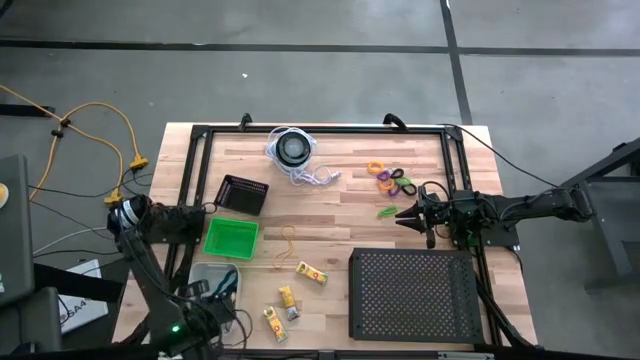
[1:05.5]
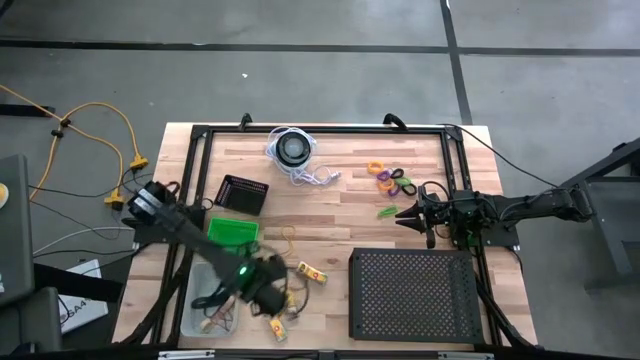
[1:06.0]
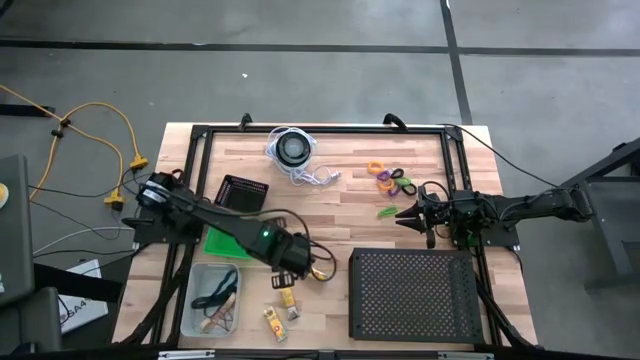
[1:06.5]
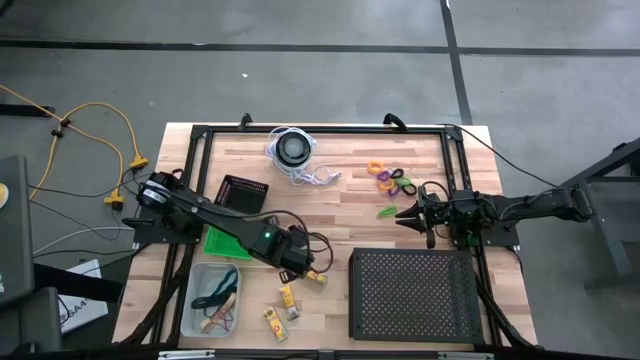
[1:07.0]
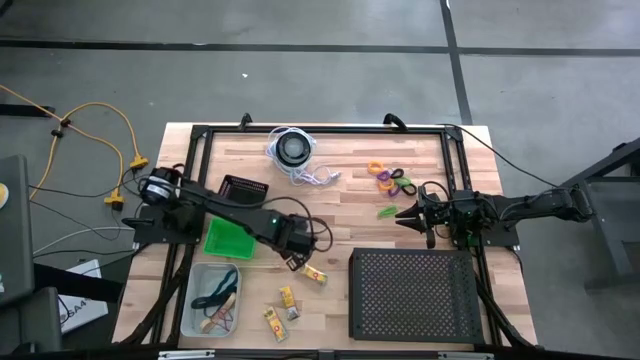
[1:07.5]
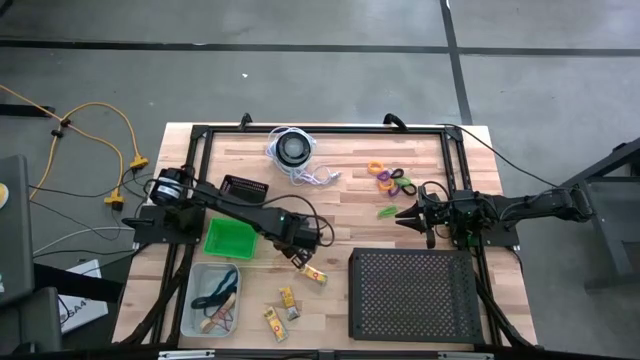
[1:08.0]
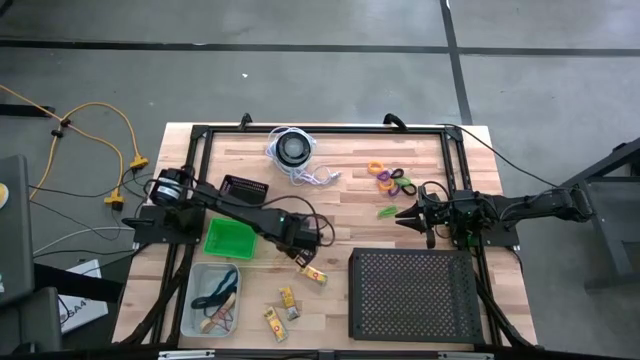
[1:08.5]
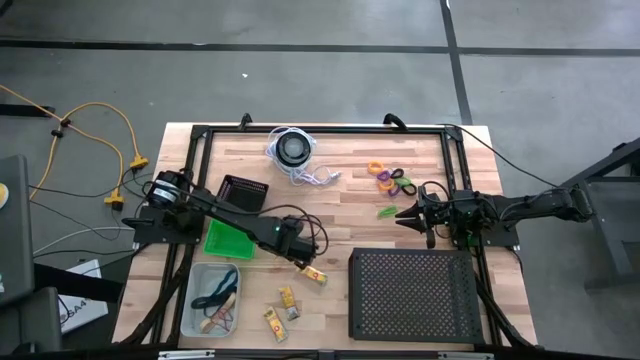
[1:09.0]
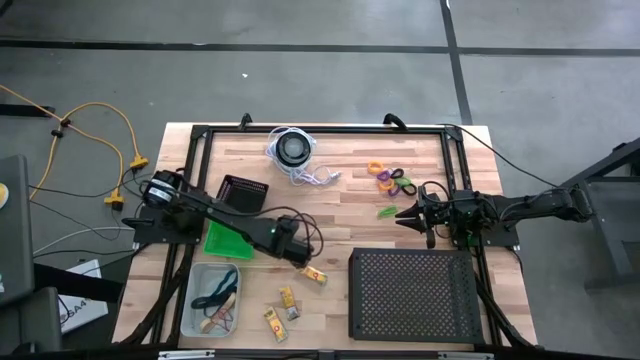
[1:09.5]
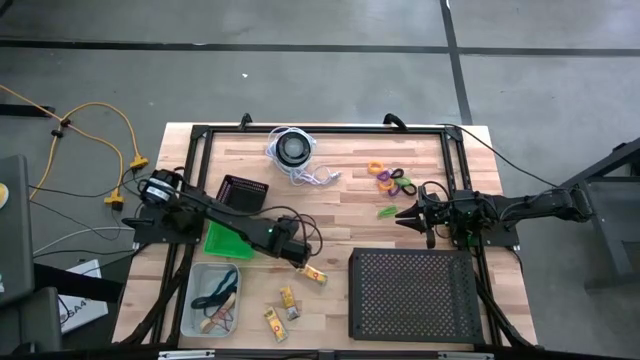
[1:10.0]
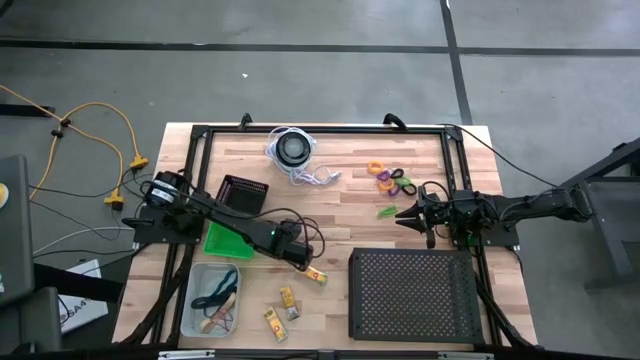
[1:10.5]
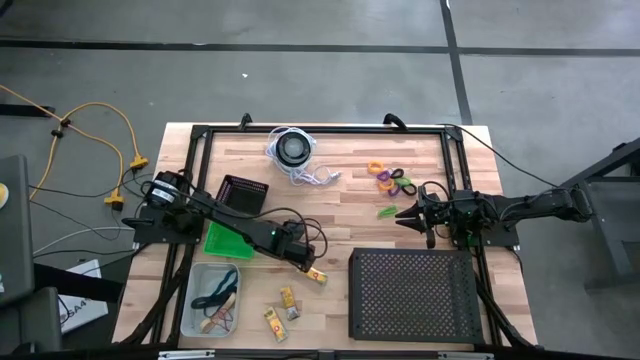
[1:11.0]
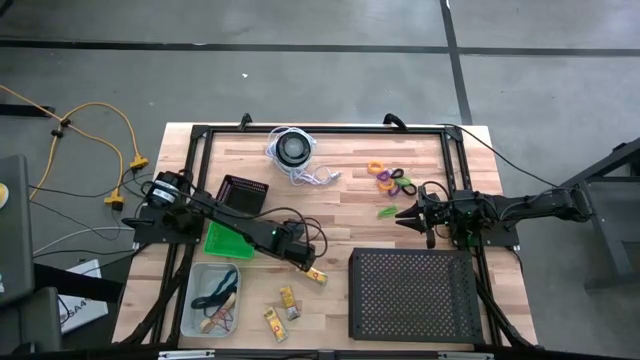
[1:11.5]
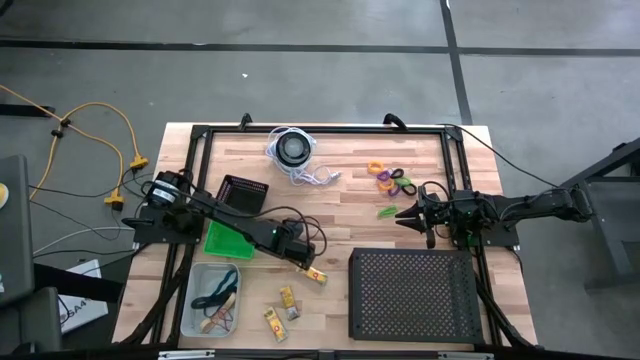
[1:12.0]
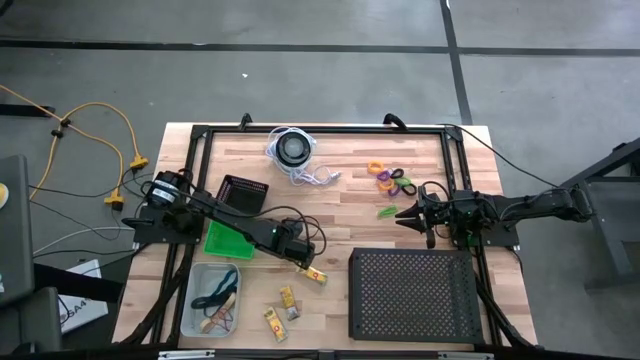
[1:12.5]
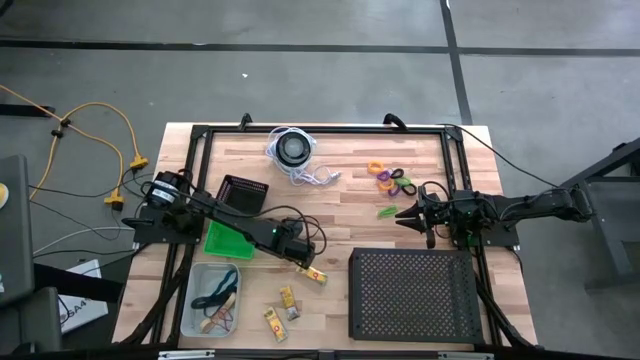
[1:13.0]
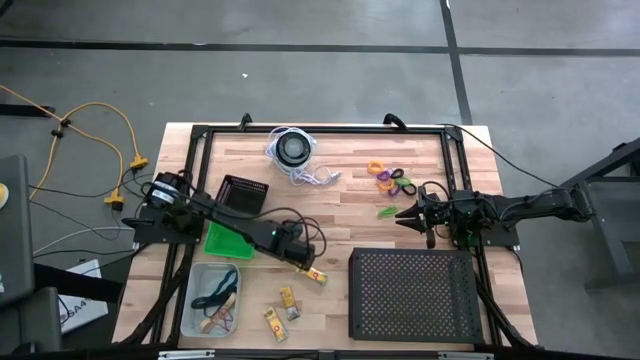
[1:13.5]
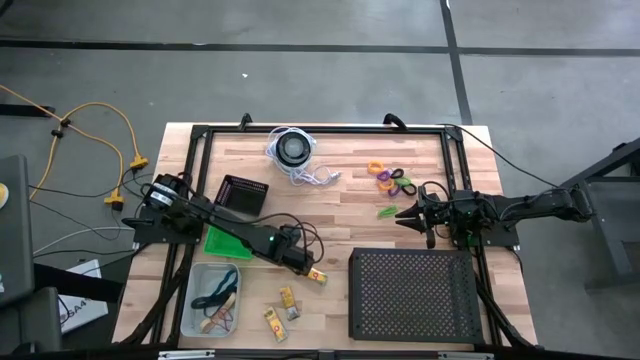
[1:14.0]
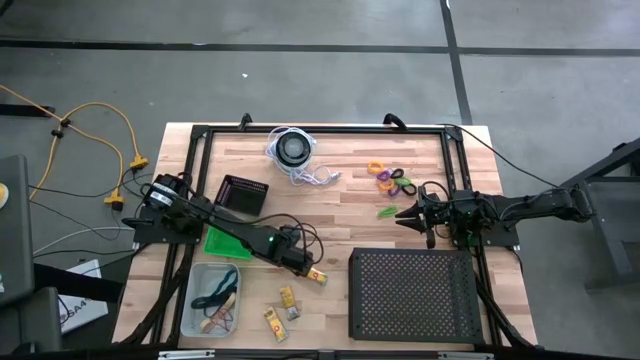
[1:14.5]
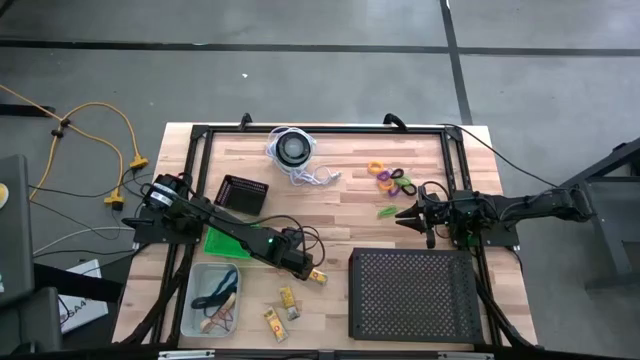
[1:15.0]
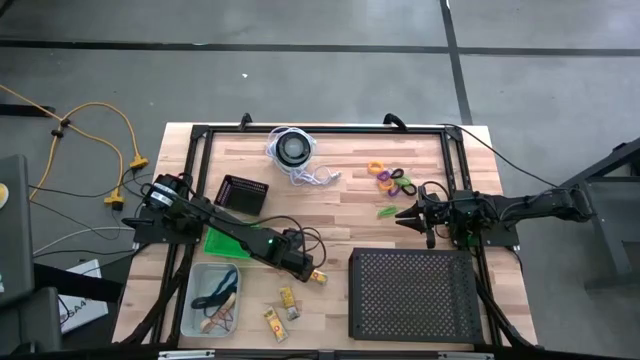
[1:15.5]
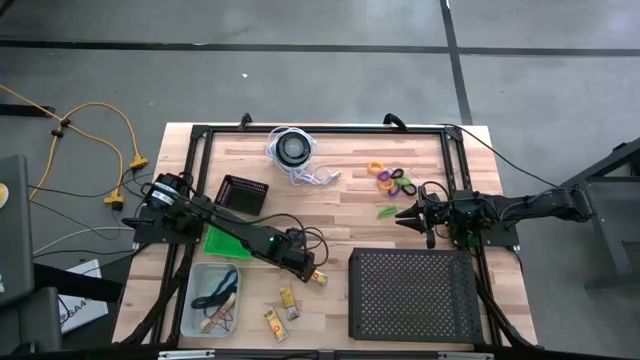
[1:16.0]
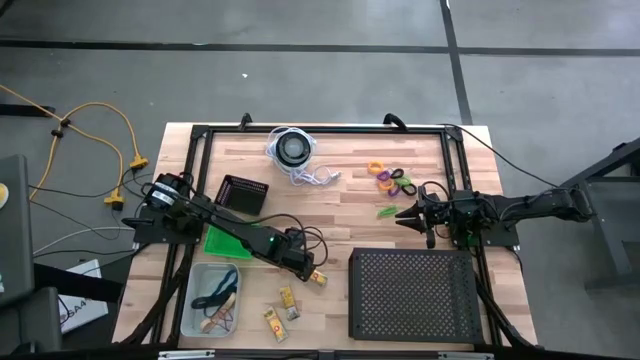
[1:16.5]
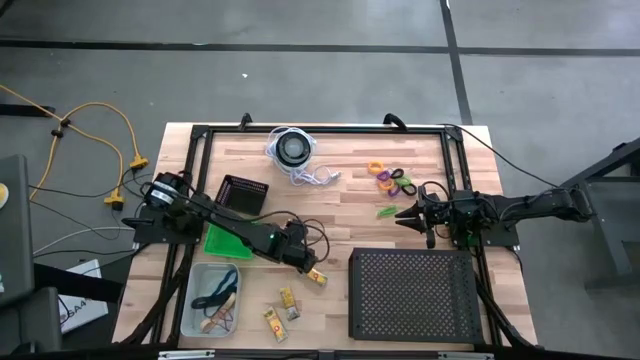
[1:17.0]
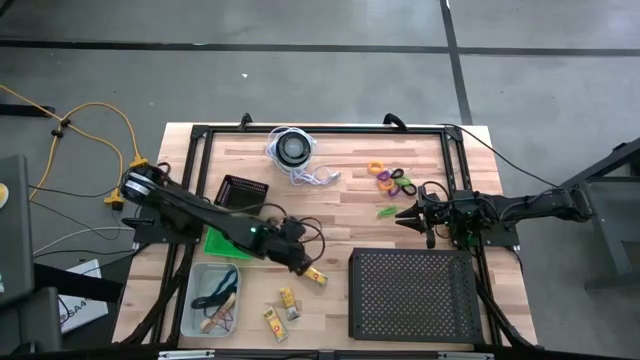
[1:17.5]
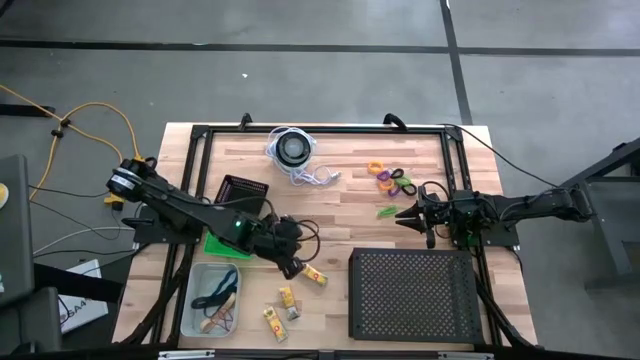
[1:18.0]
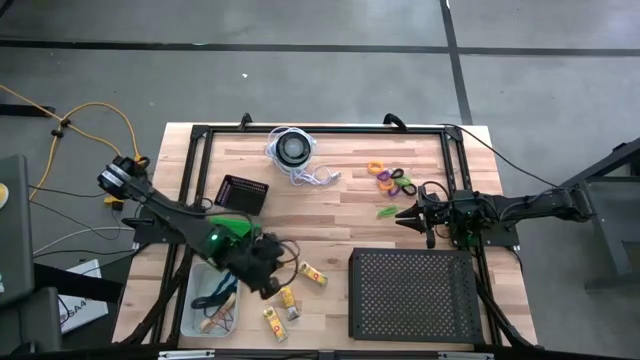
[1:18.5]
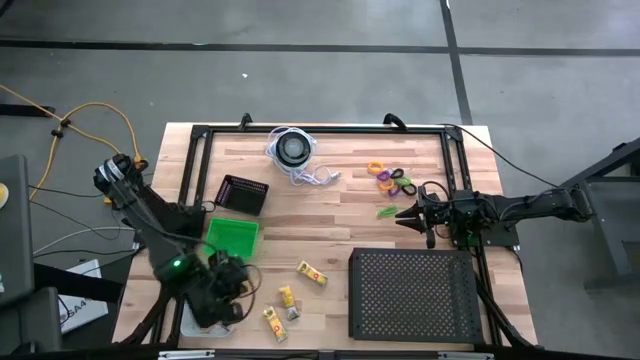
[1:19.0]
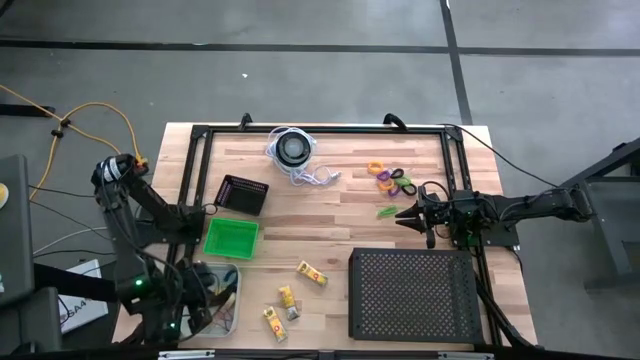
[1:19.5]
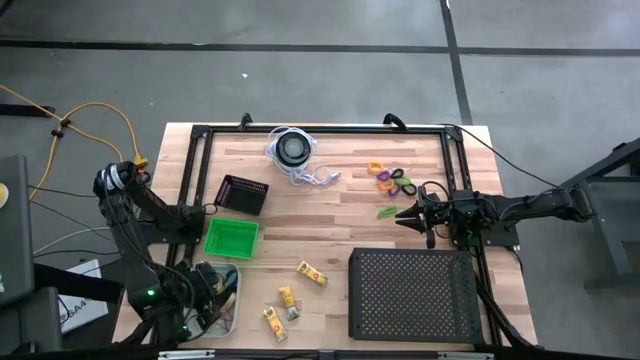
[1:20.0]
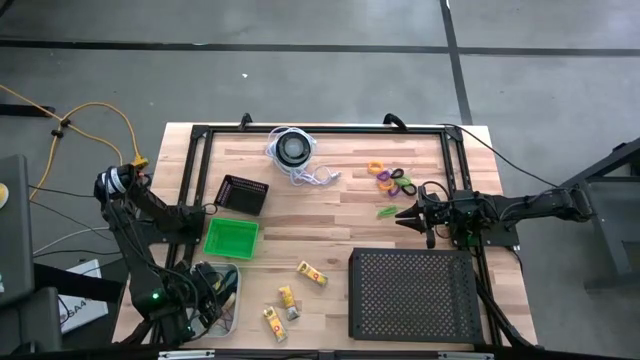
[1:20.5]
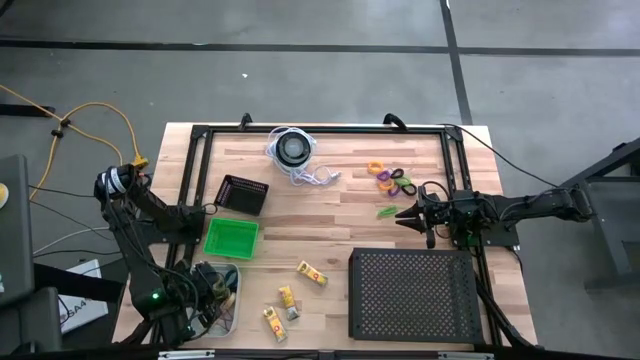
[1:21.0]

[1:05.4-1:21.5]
Task: Pick & Place Office Desk Supplies
Put the yellow rubber band into the gray bin

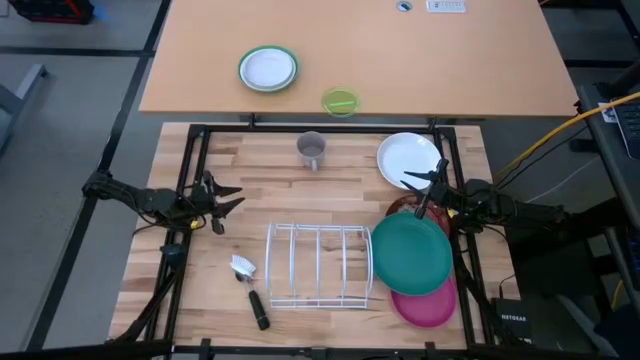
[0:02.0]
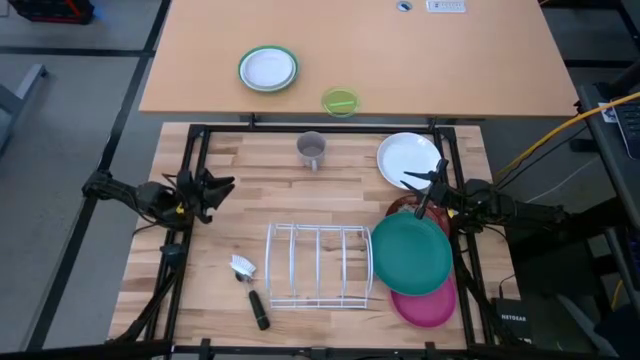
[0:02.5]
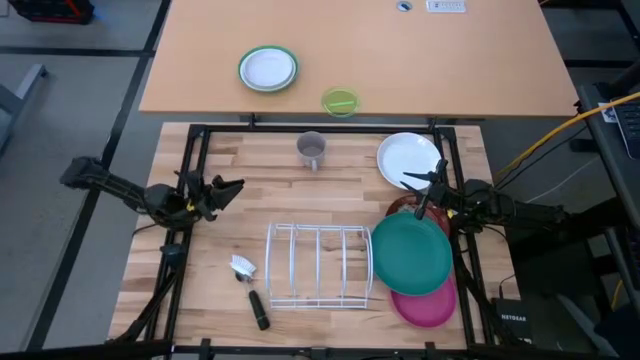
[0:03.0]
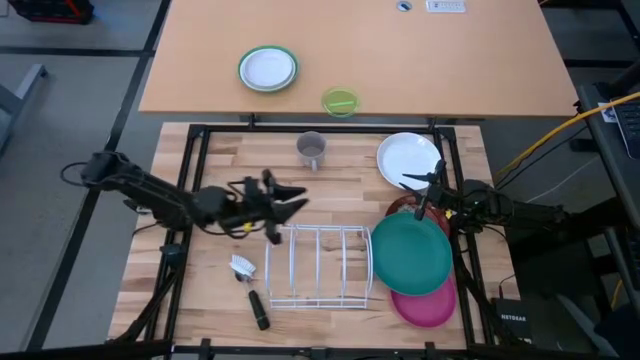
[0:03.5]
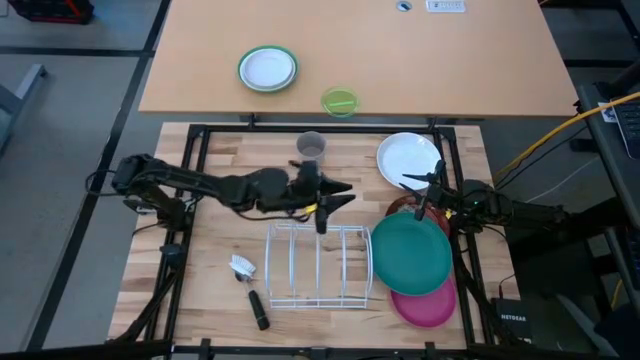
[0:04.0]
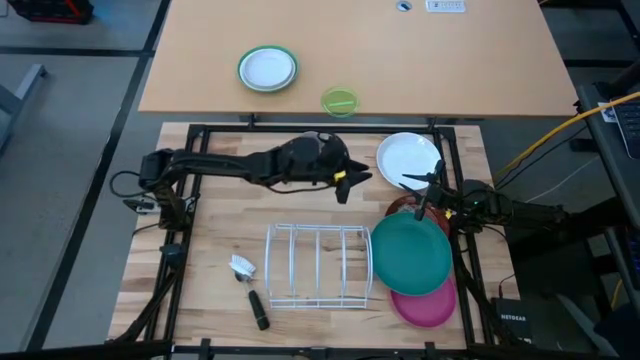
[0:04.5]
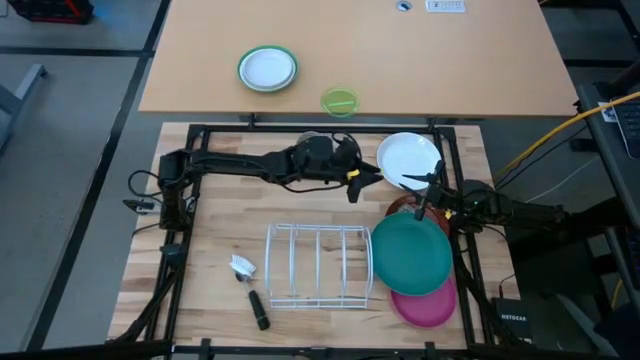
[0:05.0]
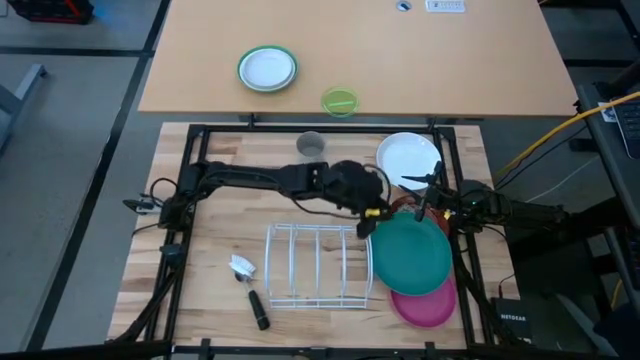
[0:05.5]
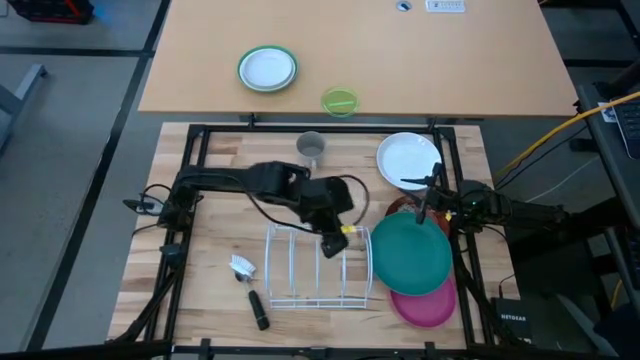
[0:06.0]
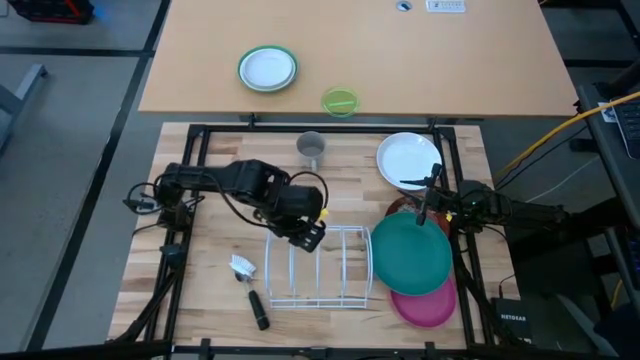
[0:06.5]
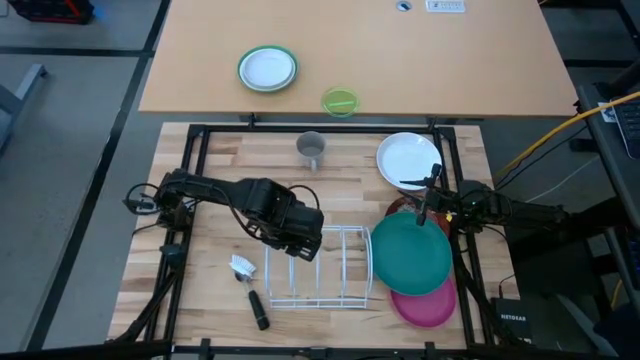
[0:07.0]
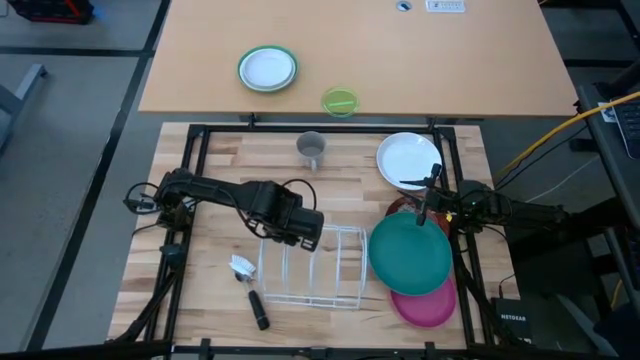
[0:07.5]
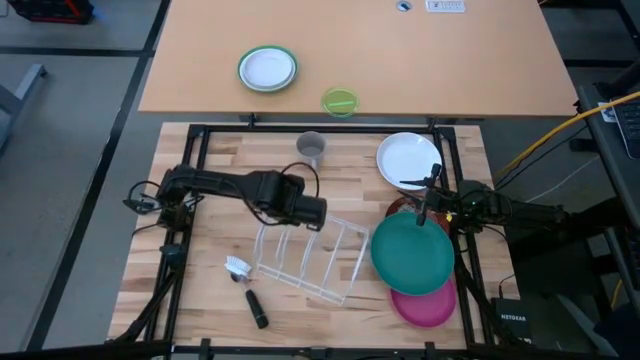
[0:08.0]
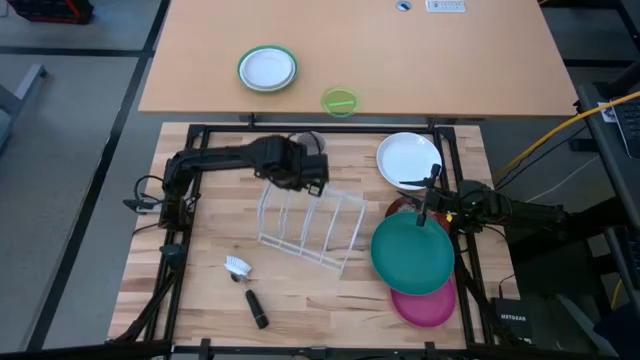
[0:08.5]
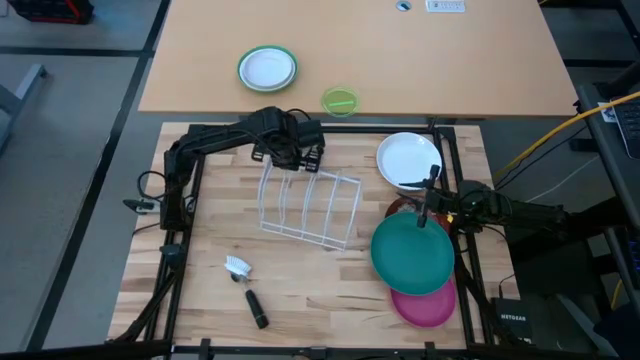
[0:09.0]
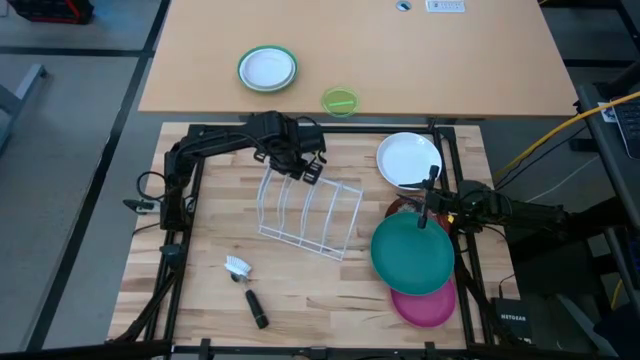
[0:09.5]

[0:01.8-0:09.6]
Task: Sort dishes
Move the dish rack to the center of the table
